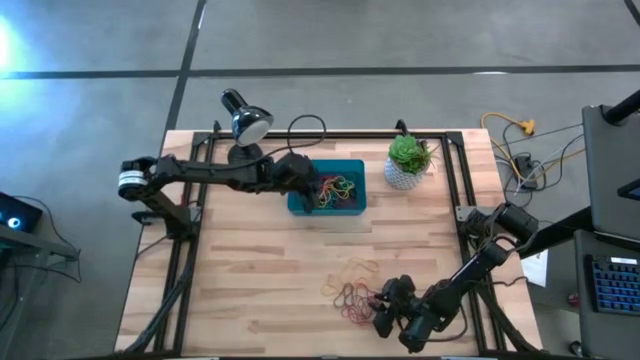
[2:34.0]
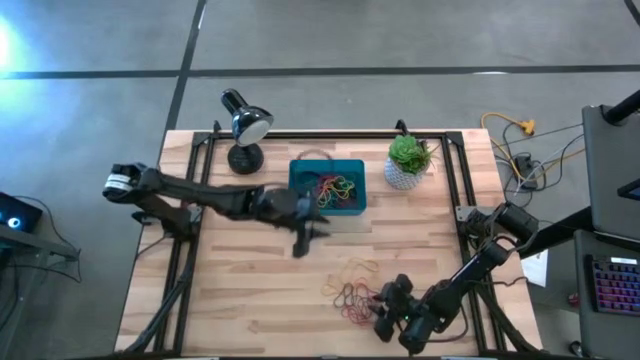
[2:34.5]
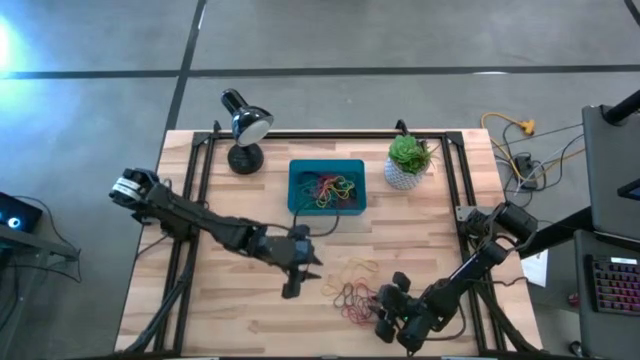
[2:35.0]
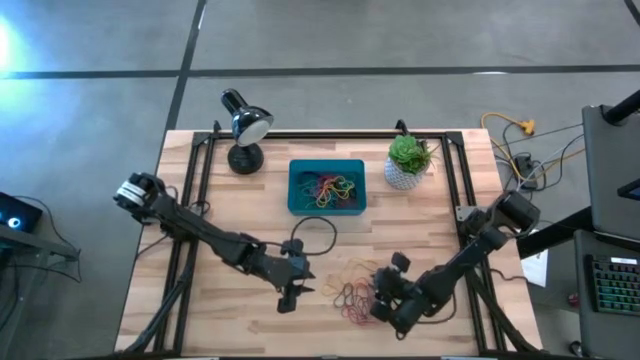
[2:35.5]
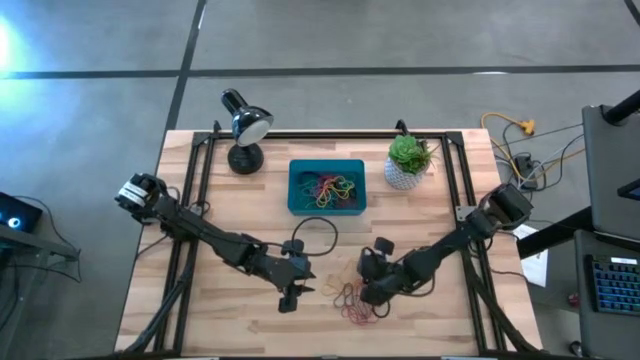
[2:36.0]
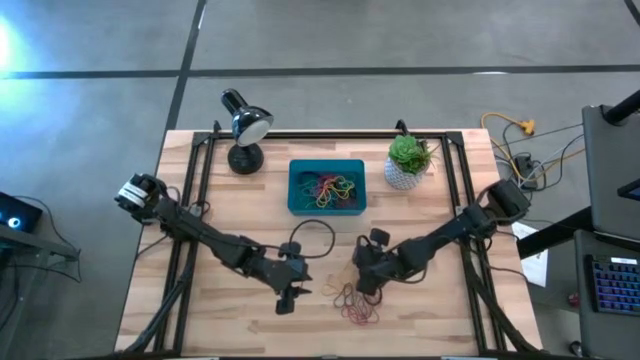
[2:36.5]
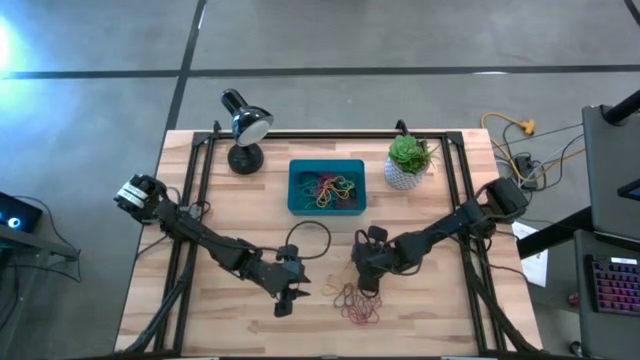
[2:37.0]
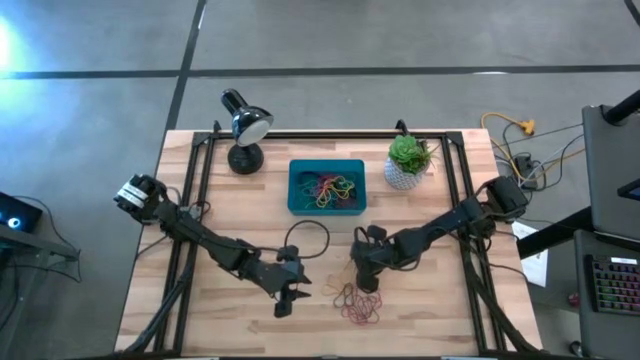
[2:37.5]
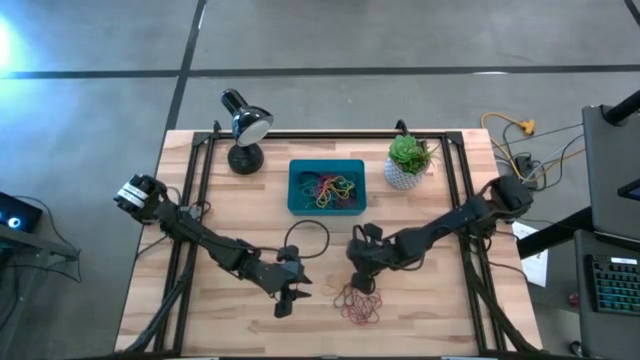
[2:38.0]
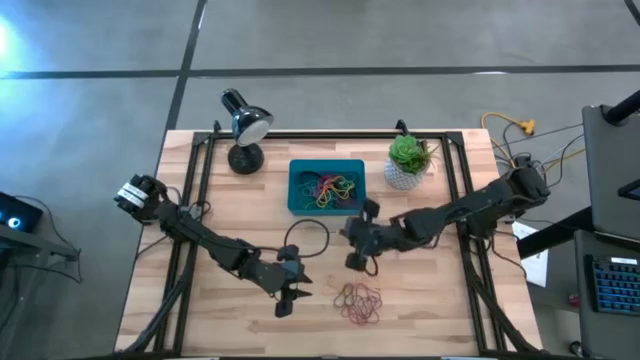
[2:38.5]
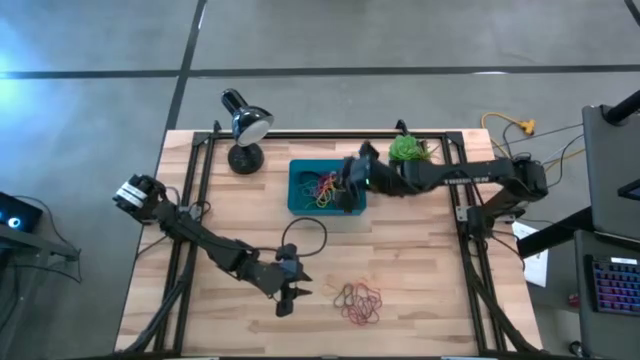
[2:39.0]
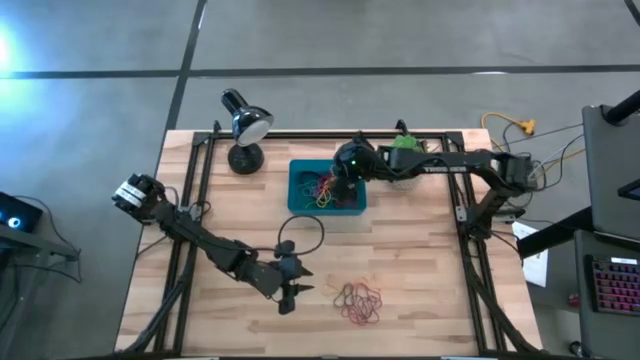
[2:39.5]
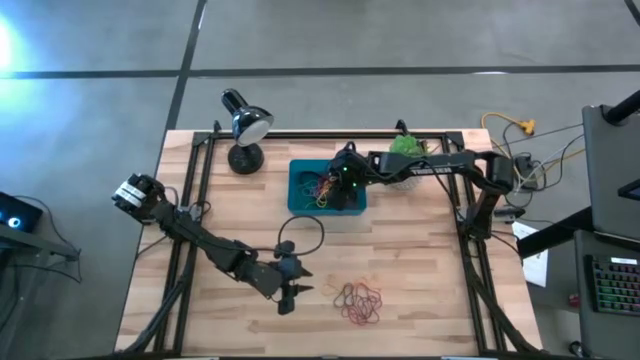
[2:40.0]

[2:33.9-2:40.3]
Task: Pick and place rubber bands into bin
Put the yellow rubber band into the dark blue bin

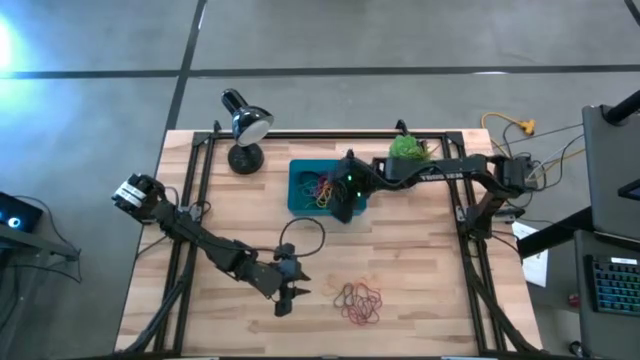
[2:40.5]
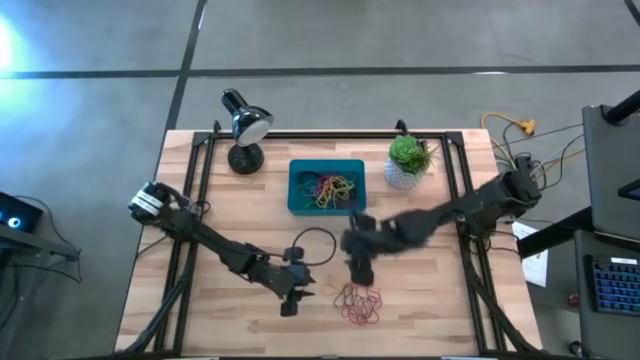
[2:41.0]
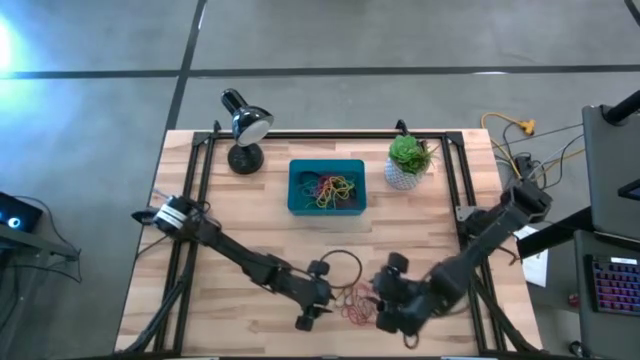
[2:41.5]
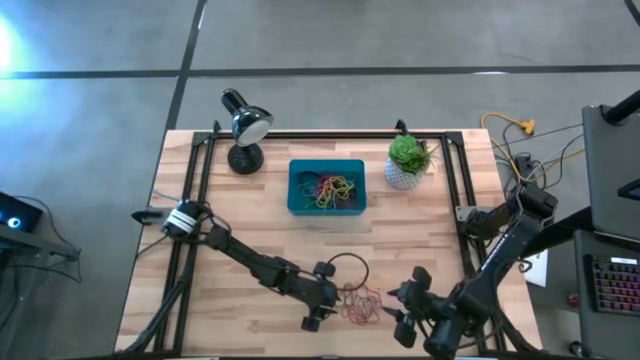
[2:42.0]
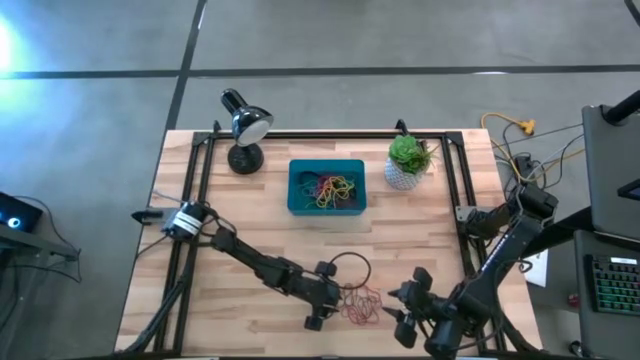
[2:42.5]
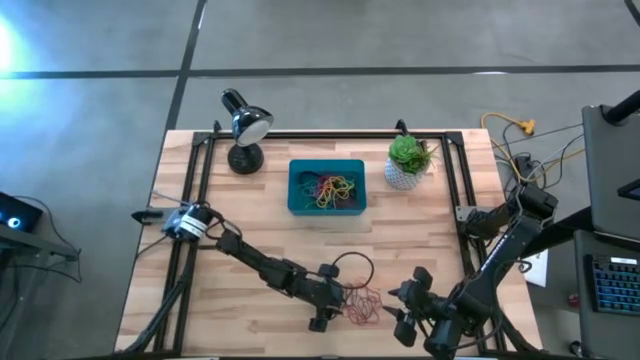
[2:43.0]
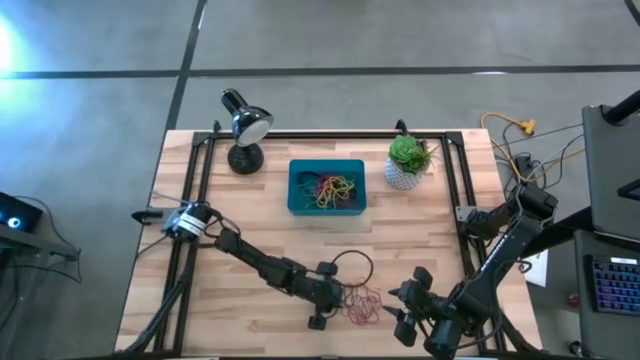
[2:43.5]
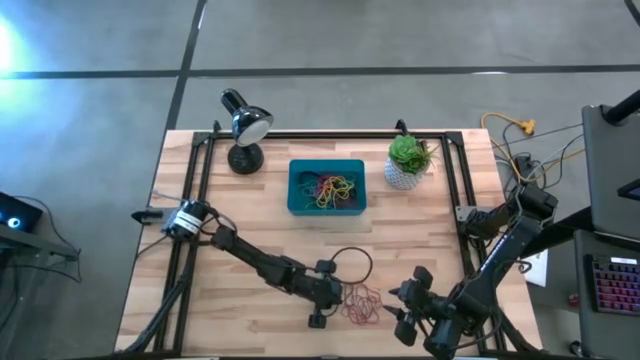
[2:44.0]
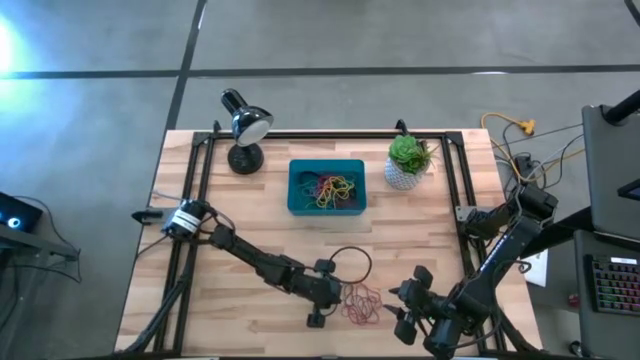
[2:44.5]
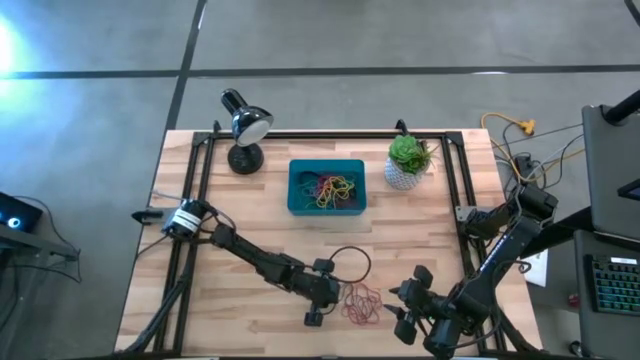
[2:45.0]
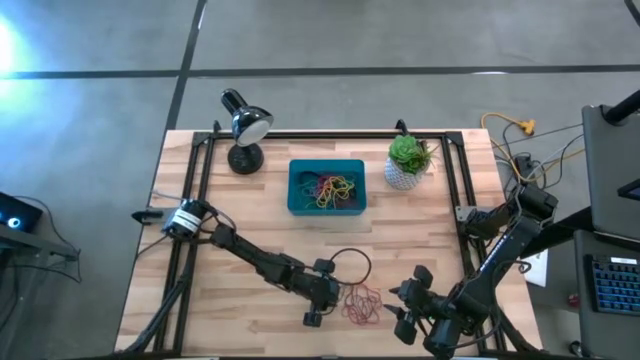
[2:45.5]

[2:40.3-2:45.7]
Put the left purple rubber band into the dark blue bin

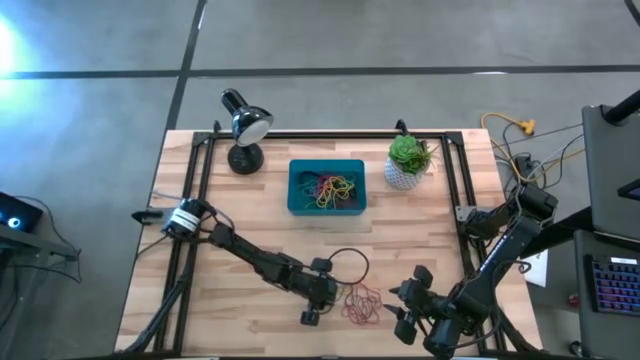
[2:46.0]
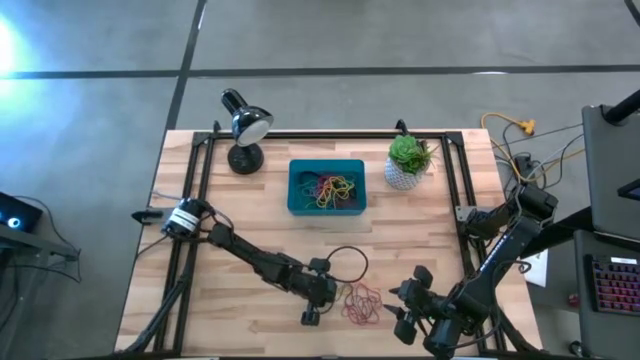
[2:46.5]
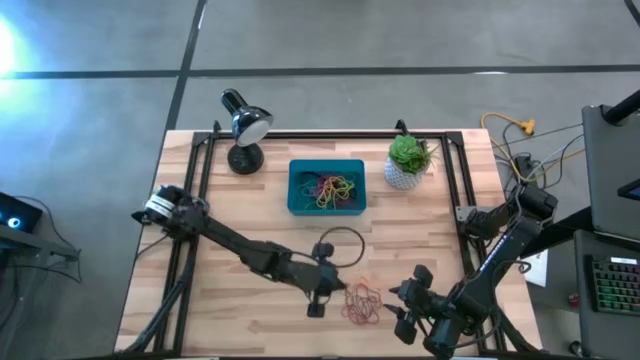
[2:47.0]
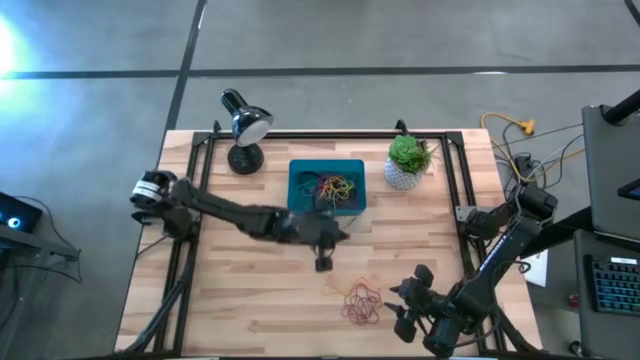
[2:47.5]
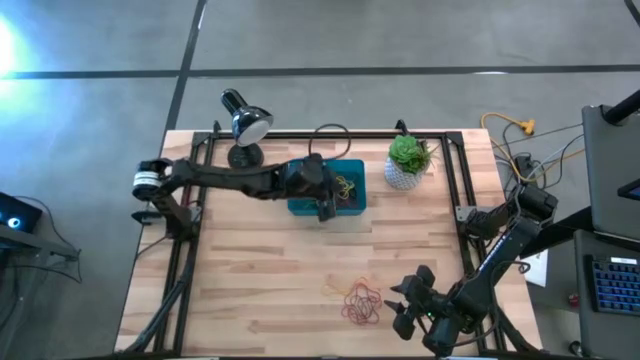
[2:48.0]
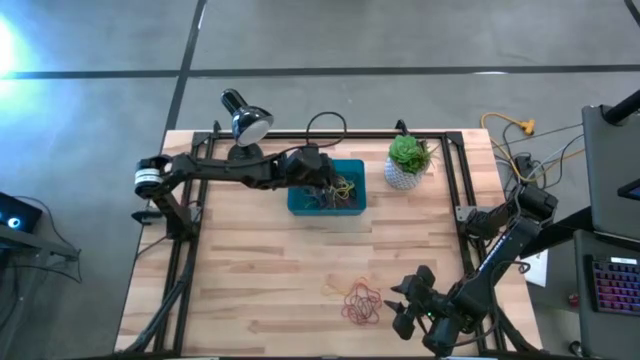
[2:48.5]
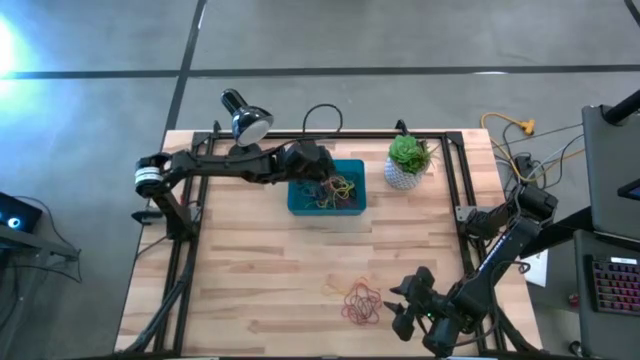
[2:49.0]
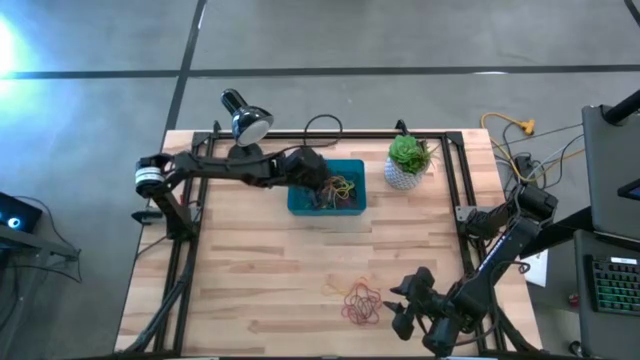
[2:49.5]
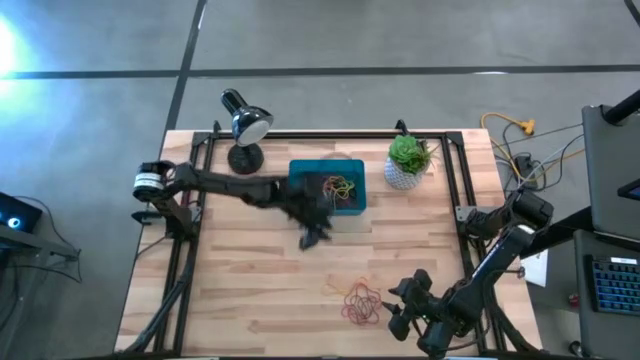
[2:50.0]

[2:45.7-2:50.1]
Put the left purple rubber band into the dark blue bin

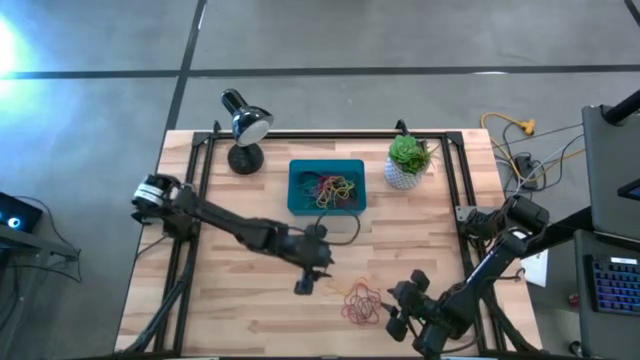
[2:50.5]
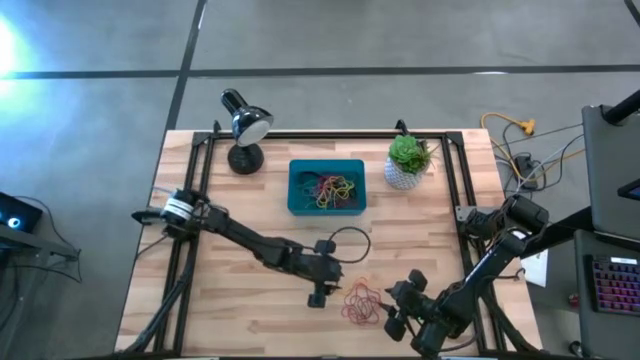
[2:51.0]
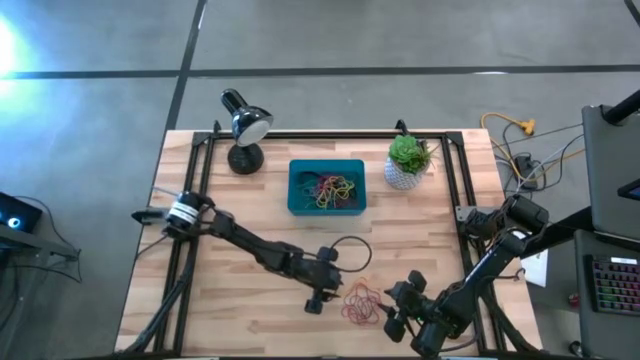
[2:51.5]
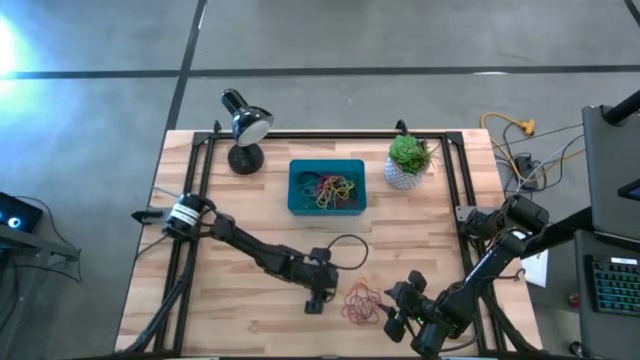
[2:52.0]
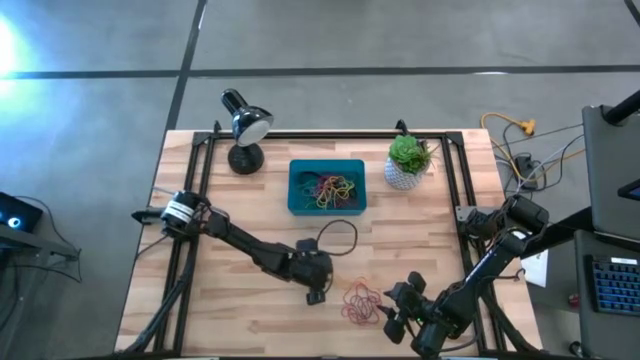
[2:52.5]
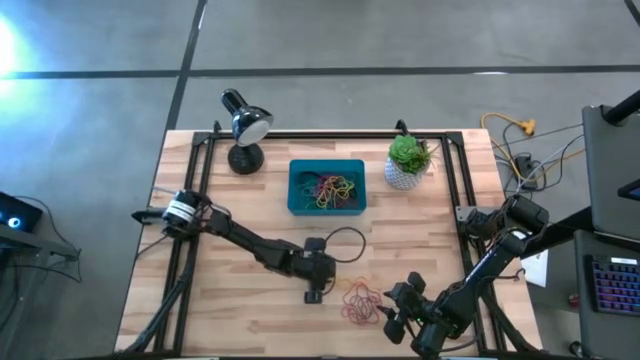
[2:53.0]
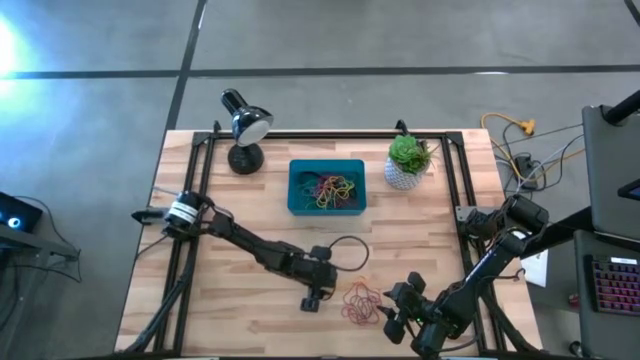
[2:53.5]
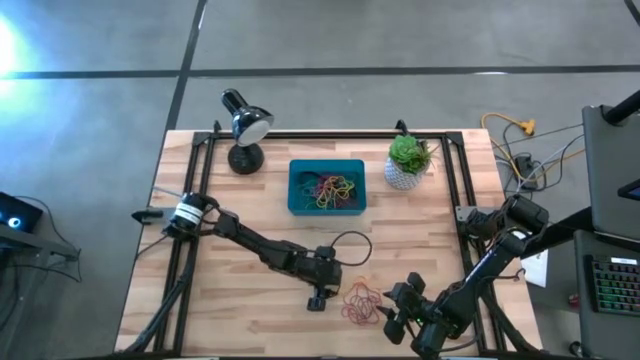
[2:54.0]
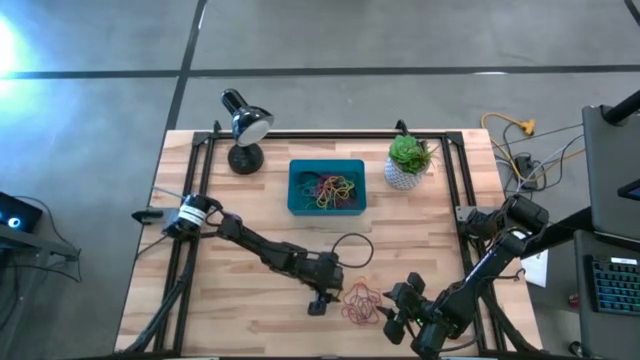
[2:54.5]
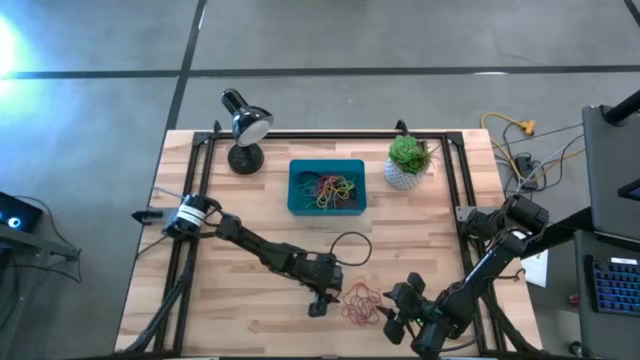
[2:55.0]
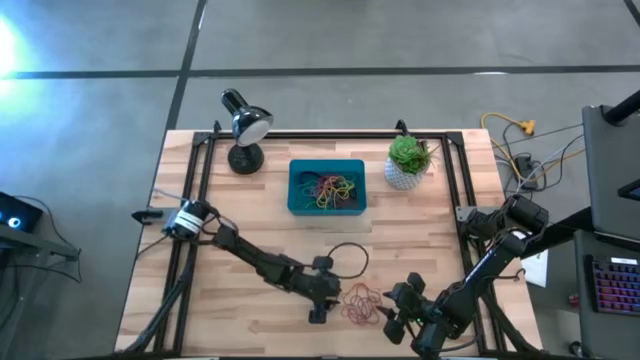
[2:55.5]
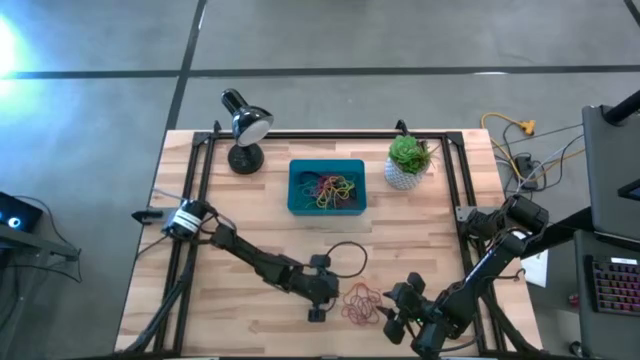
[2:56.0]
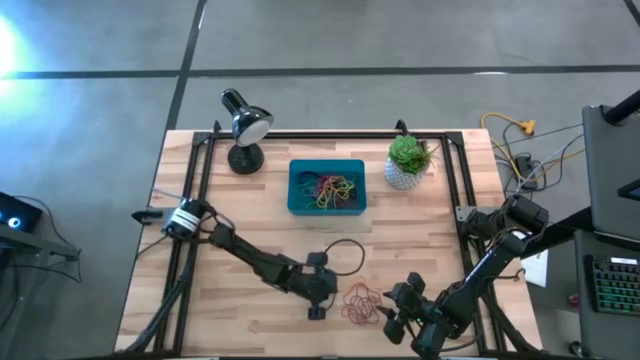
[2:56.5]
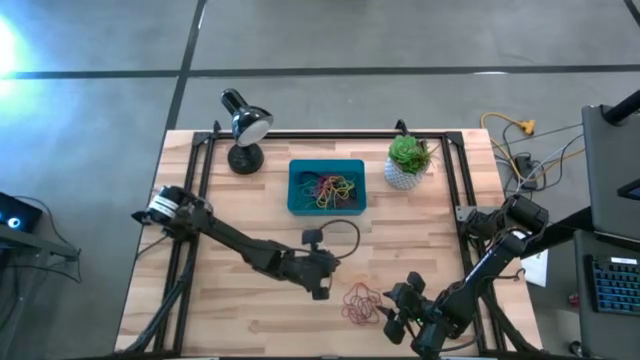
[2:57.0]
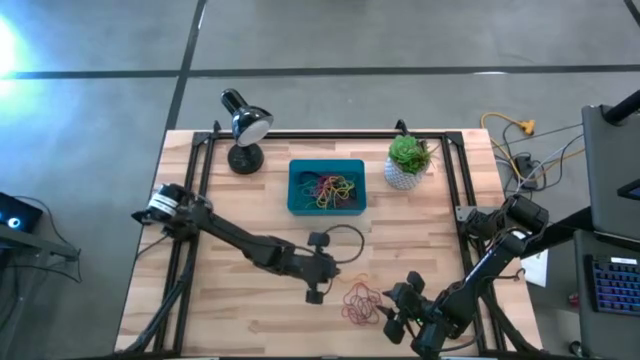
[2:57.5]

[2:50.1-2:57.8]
Put the yellow rubber band into the dark blue bin
